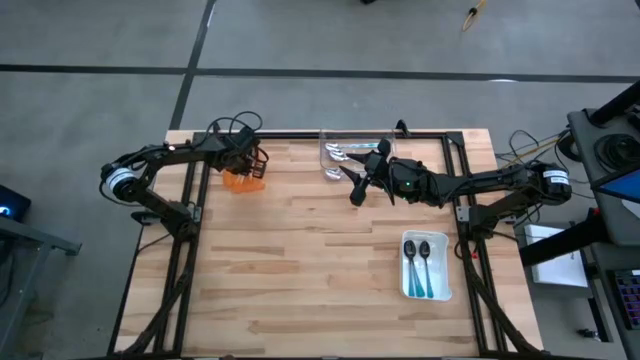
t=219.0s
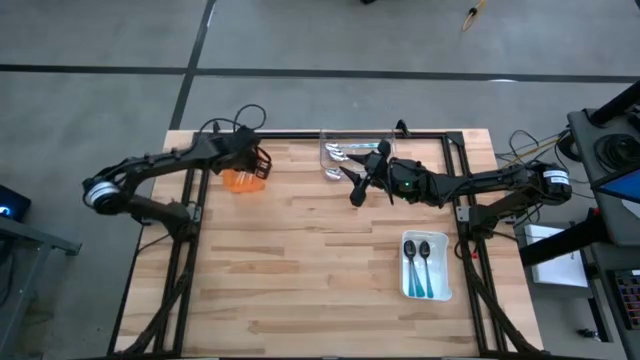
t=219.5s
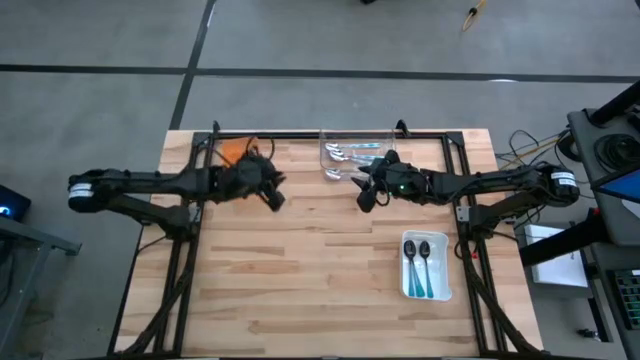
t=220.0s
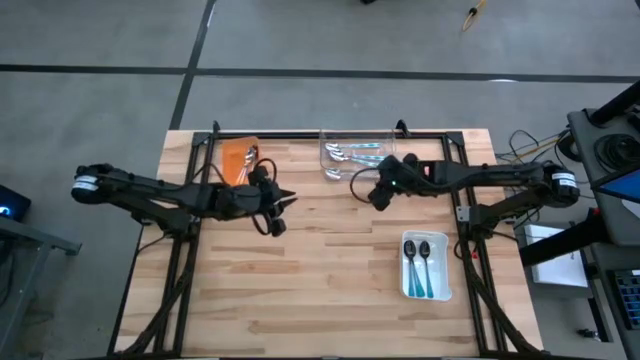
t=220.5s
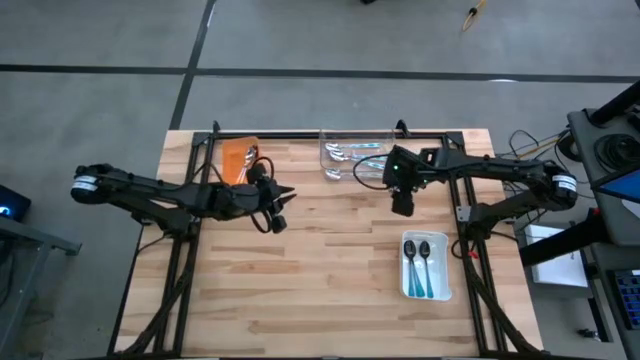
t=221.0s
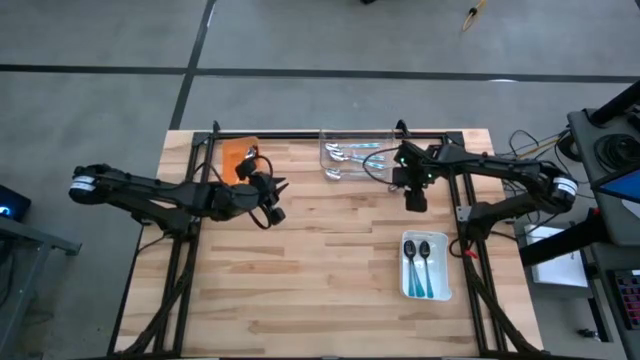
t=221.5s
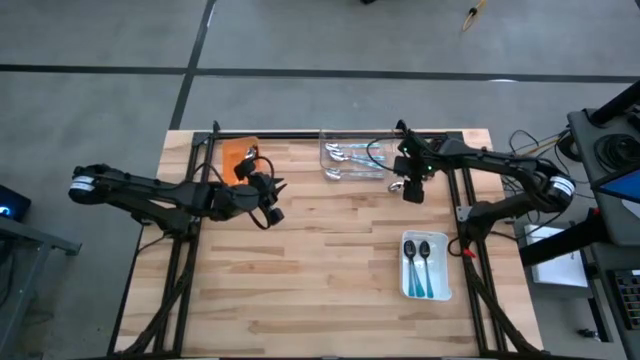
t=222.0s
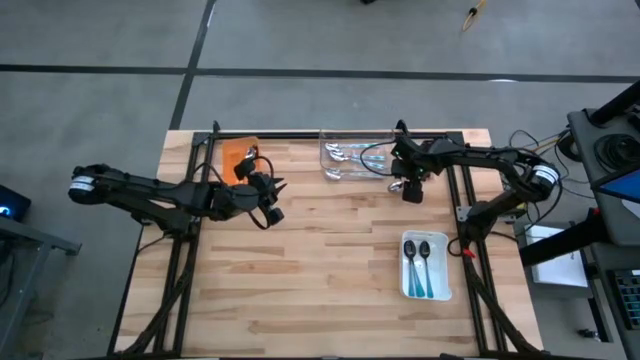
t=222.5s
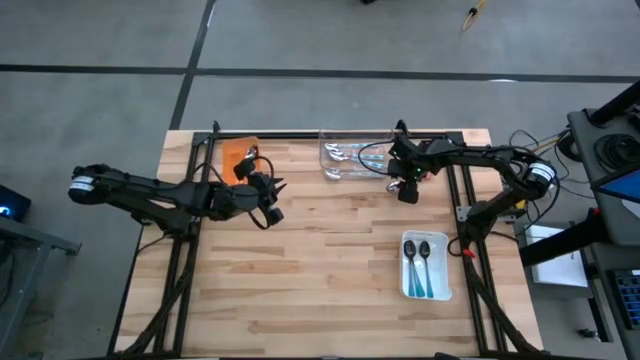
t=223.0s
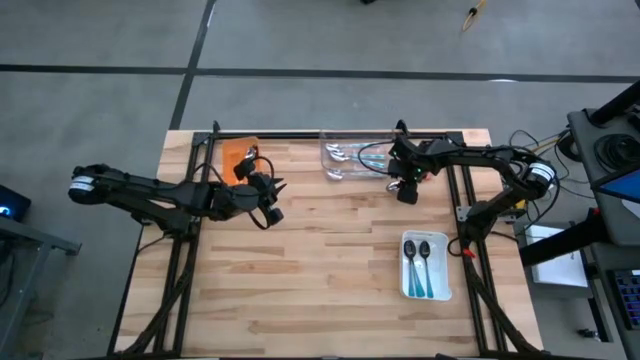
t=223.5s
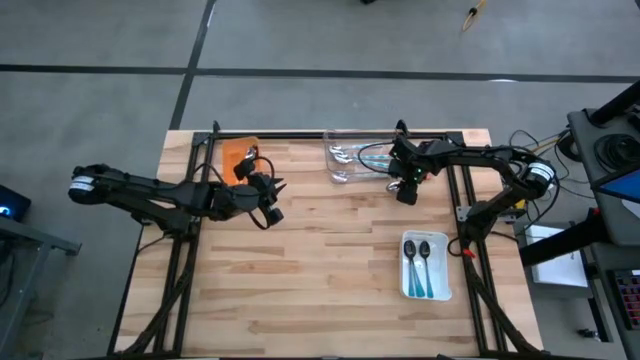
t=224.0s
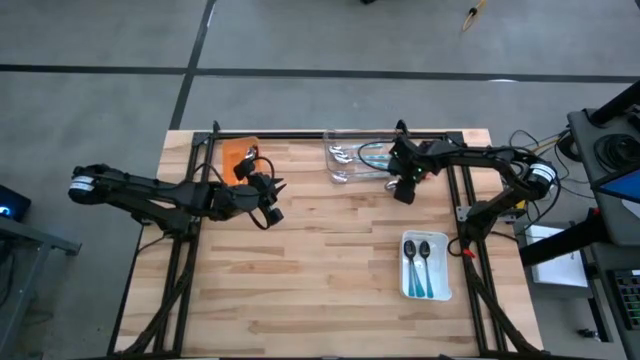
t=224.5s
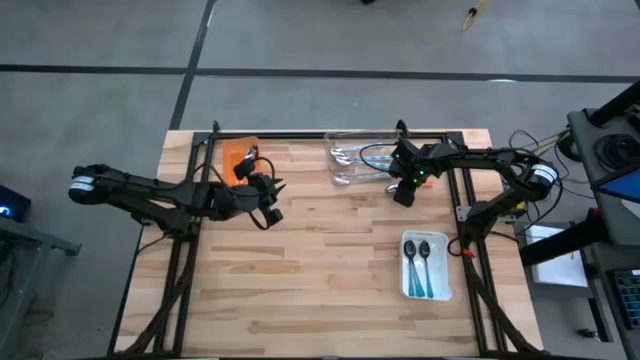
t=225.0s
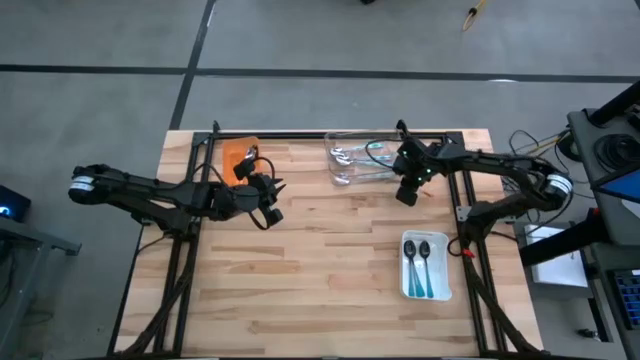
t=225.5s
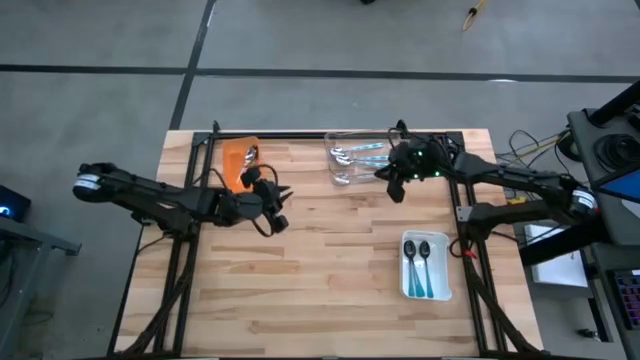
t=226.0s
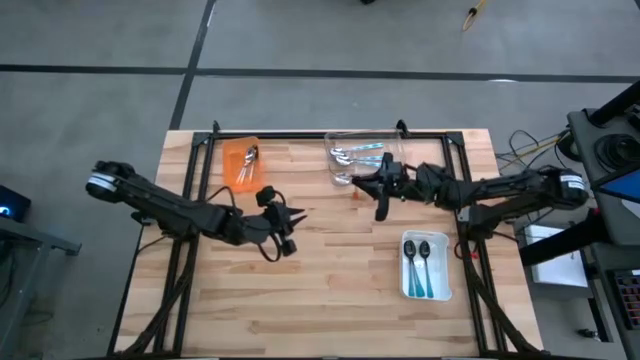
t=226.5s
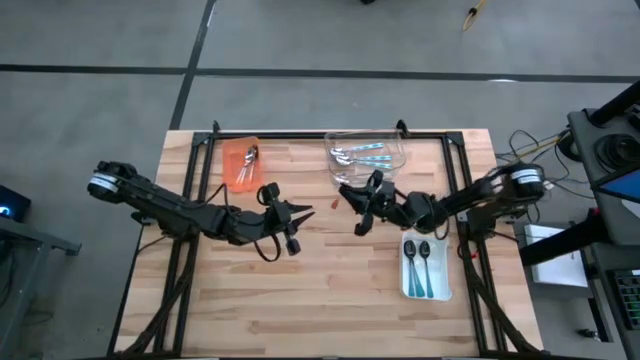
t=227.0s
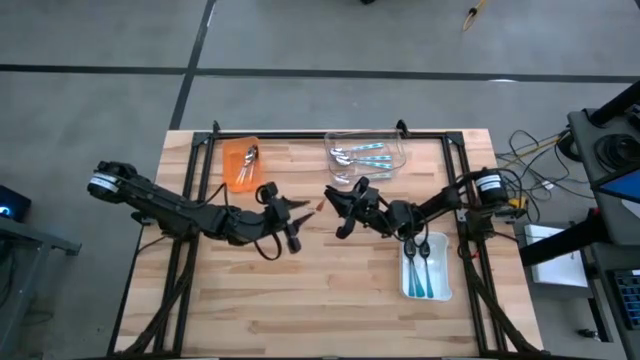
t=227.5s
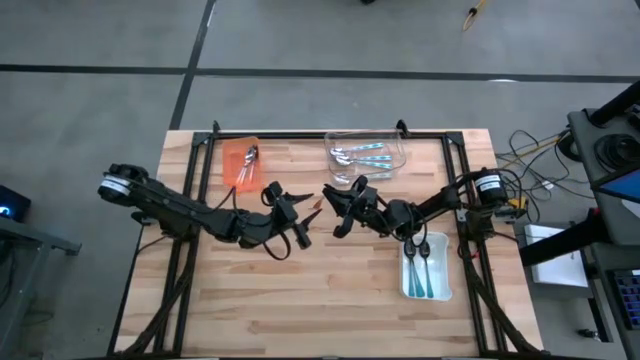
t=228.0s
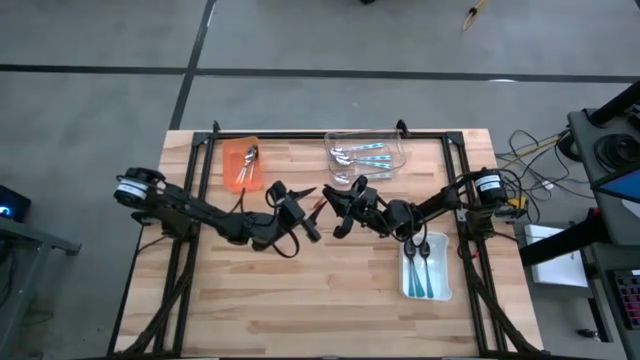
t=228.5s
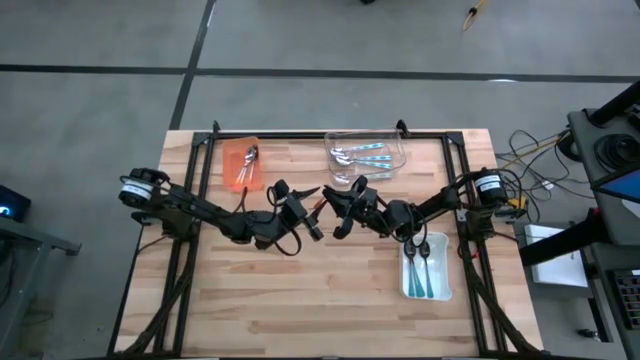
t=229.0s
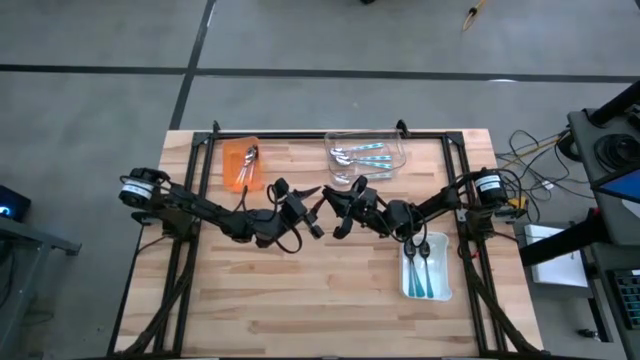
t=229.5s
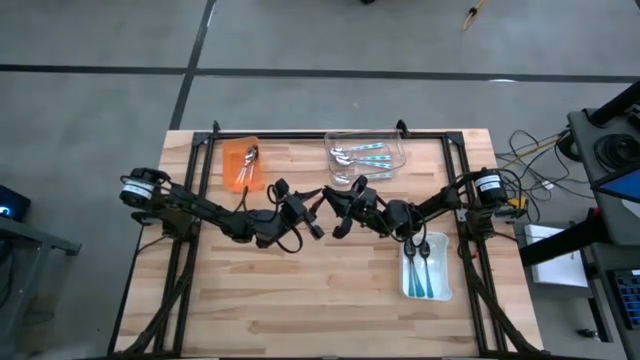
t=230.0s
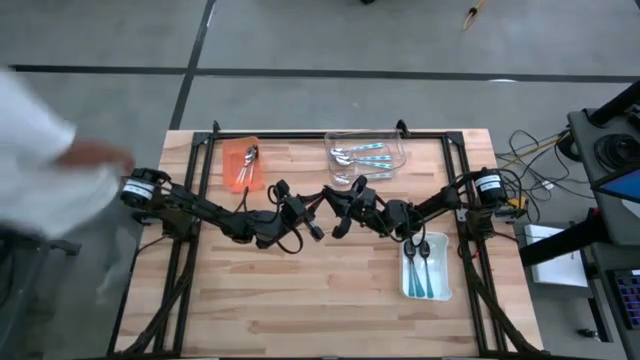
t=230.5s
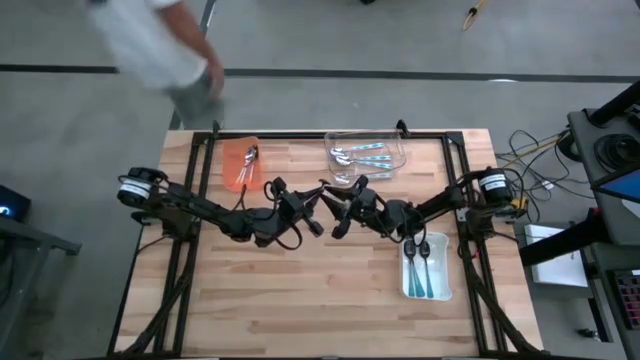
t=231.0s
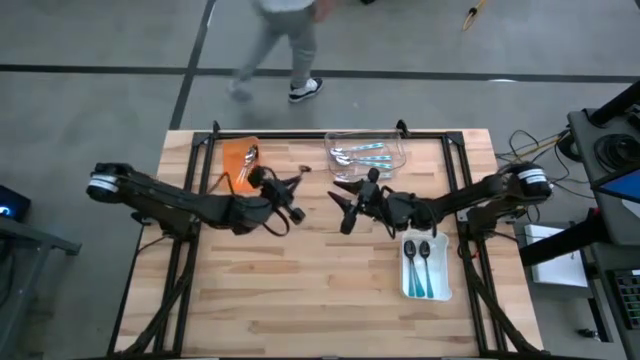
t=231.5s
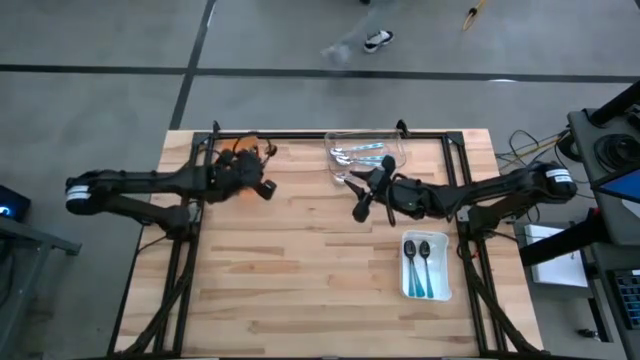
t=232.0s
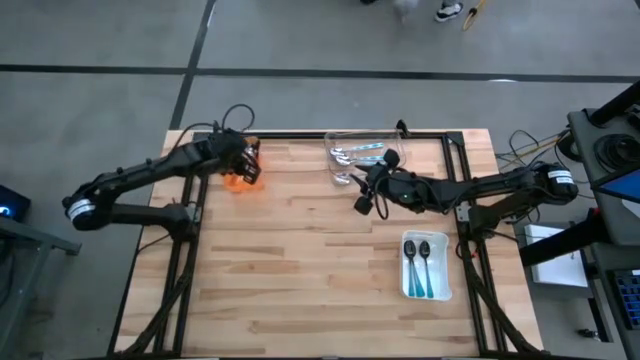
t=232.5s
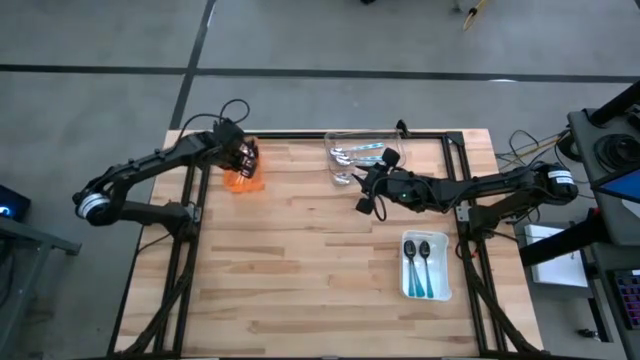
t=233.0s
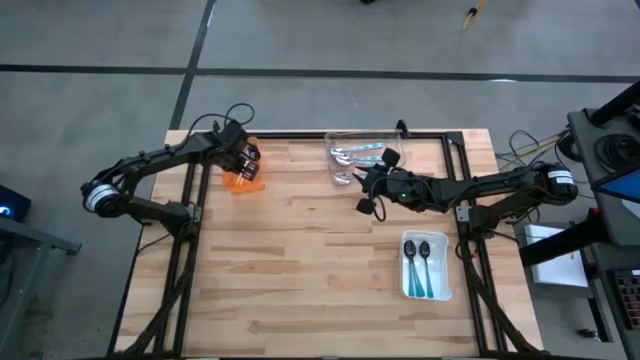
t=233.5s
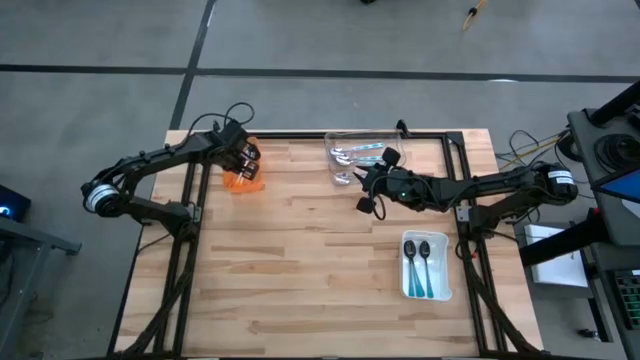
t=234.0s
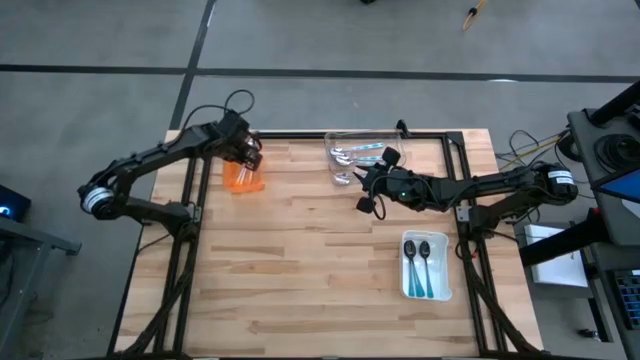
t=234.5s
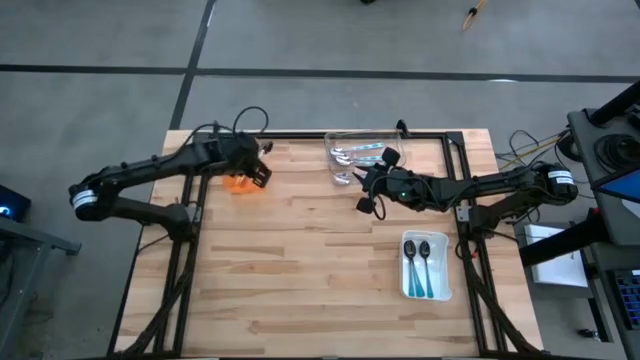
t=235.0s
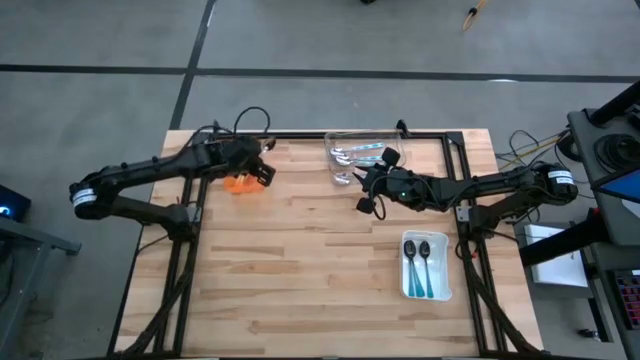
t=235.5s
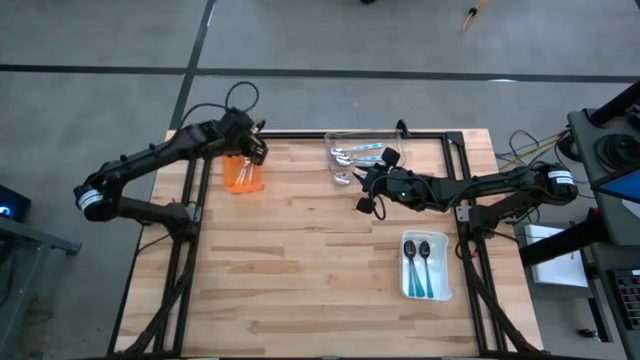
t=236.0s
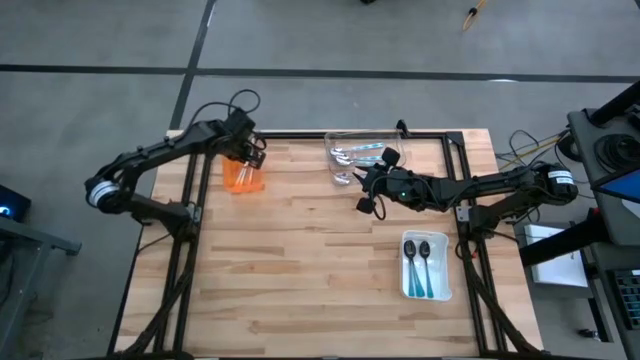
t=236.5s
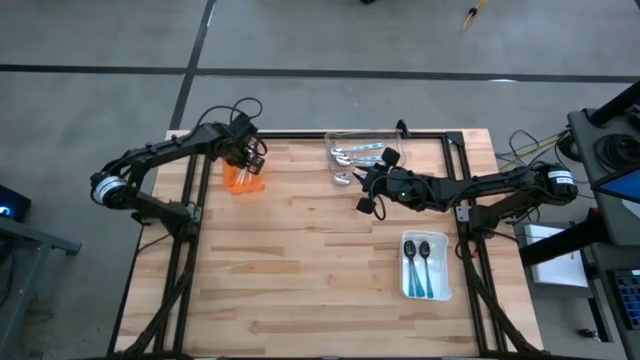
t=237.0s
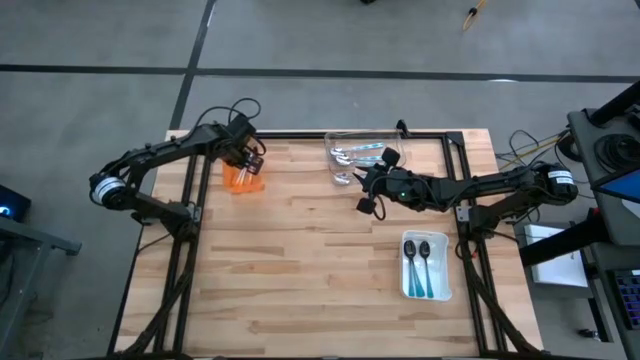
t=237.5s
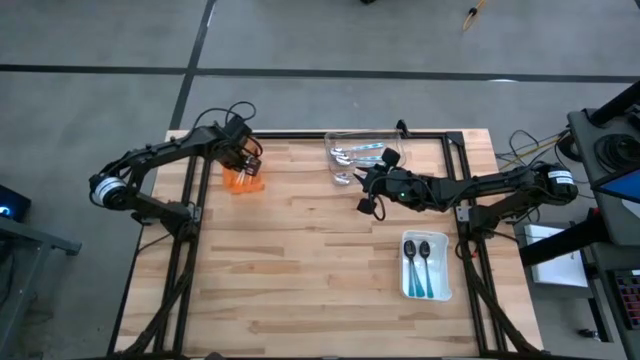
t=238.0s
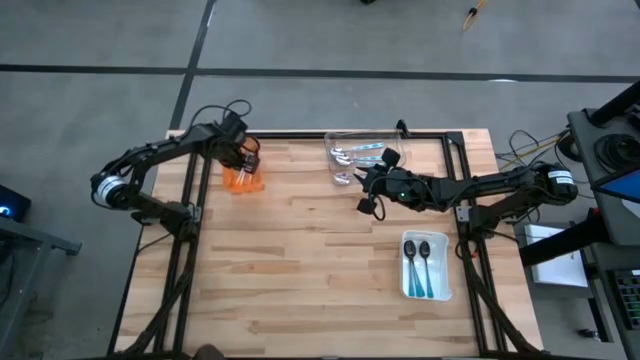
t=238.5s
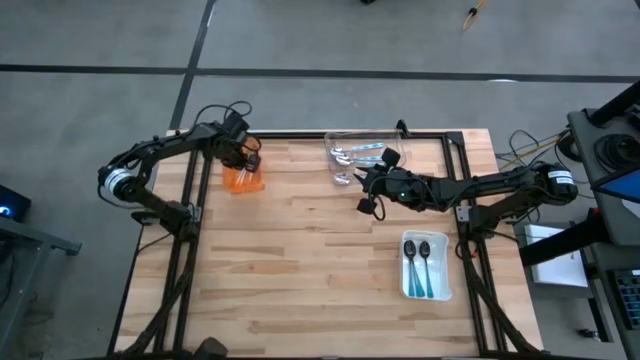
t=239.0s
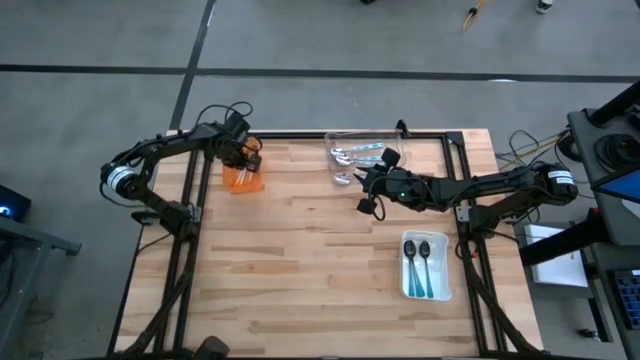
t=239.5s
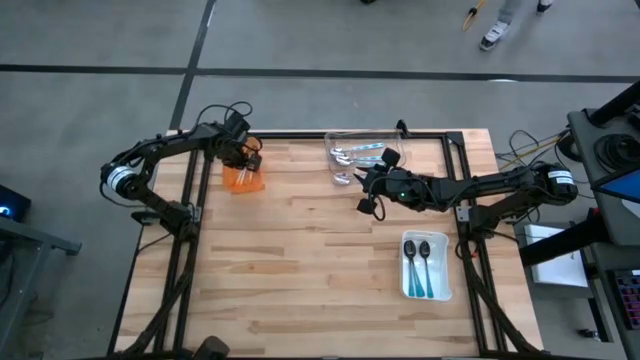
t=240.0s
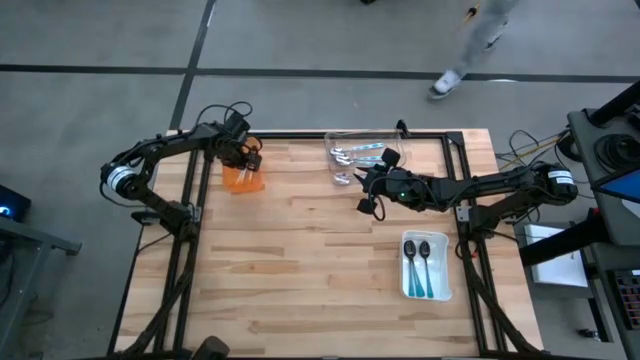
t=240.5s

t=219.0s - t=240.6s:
Task: Sort silverware by color (type)
Put the orange spoon into the orange bin

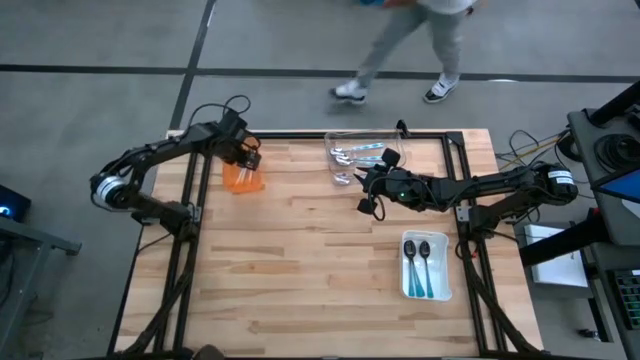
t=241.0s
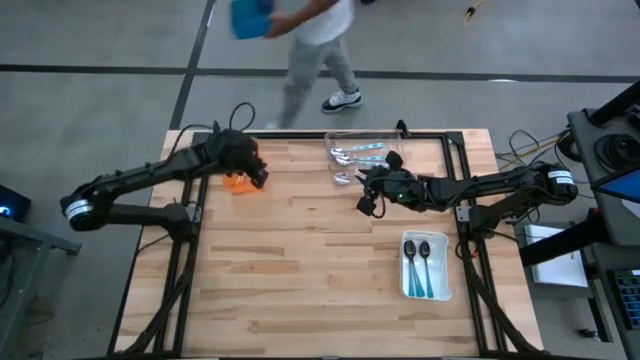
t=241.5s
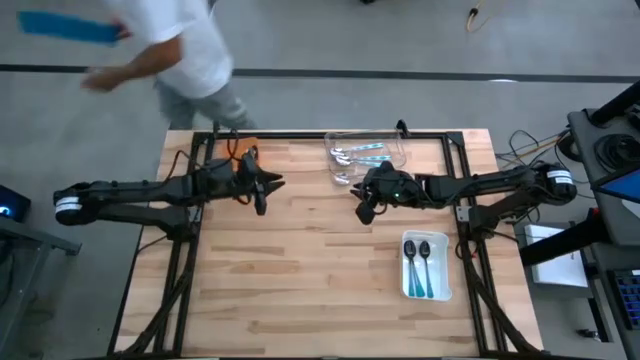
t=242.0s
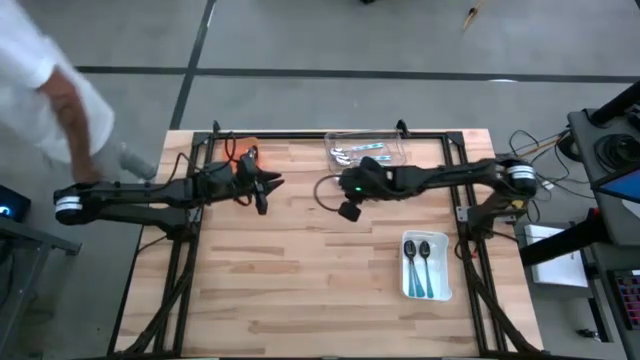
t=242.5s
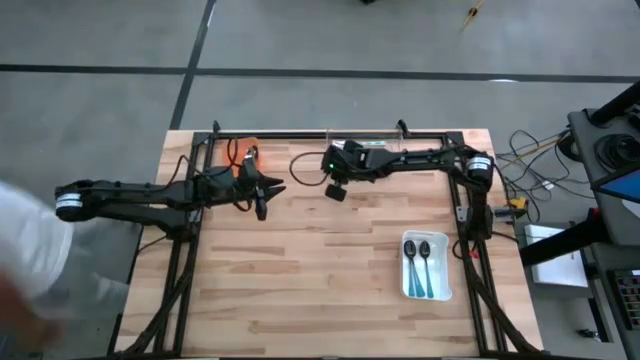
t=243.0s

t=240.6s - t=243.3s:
Adjust the transparent bin
